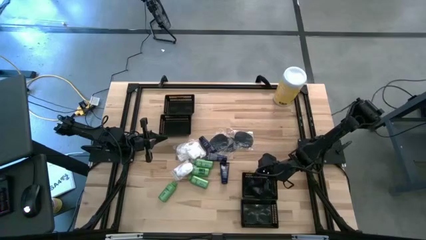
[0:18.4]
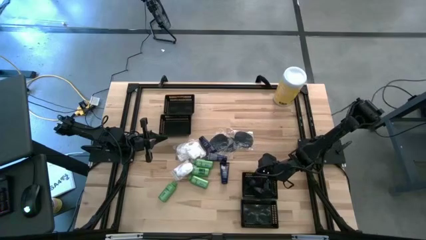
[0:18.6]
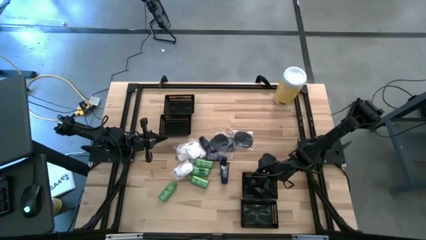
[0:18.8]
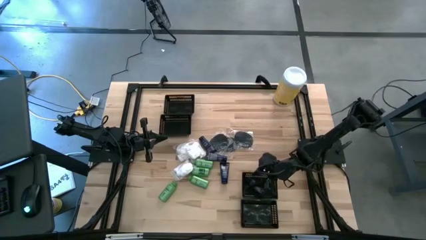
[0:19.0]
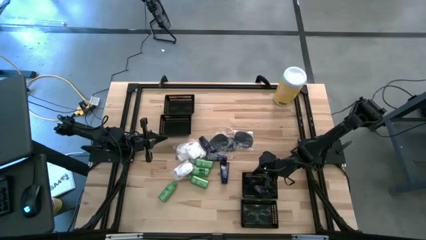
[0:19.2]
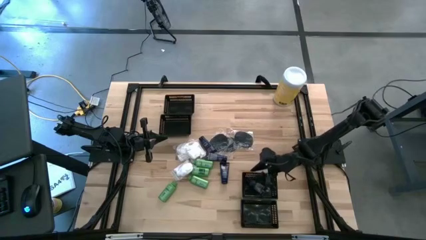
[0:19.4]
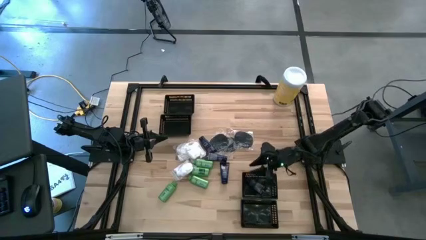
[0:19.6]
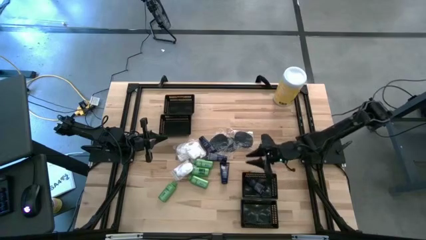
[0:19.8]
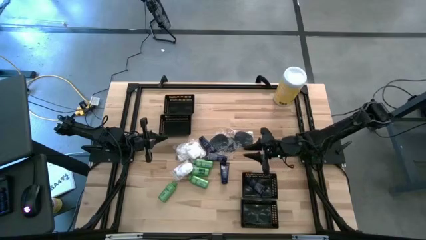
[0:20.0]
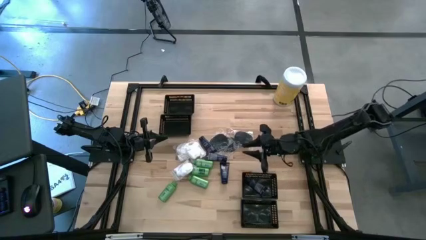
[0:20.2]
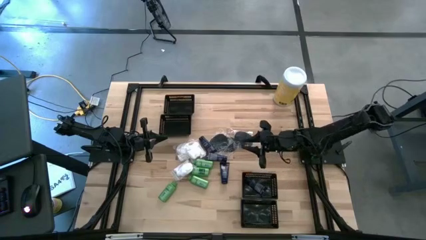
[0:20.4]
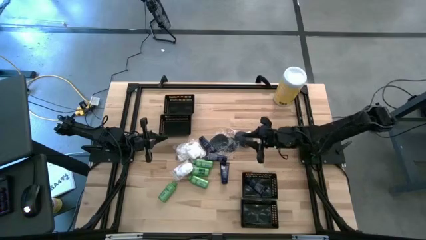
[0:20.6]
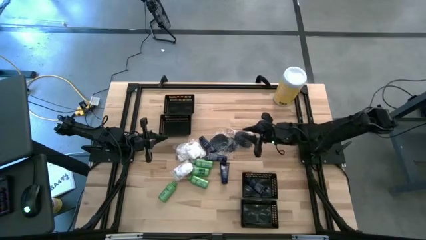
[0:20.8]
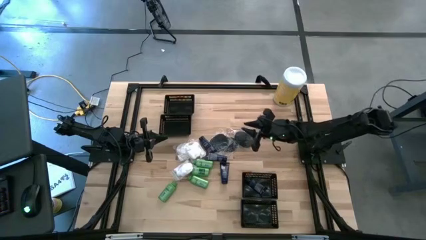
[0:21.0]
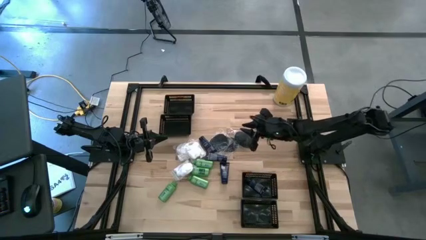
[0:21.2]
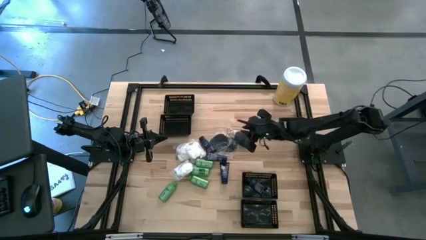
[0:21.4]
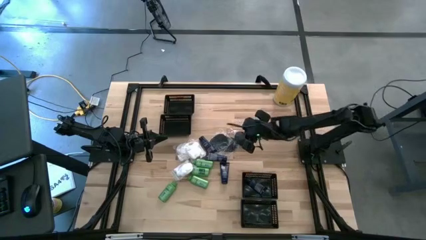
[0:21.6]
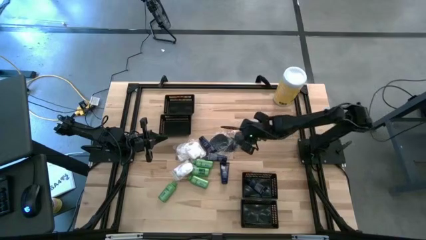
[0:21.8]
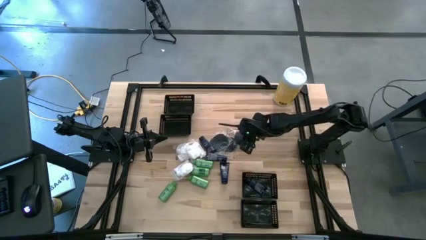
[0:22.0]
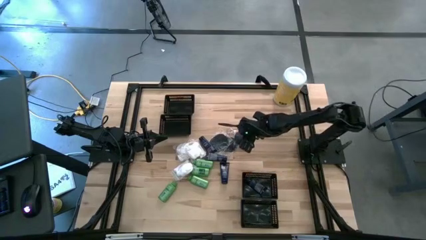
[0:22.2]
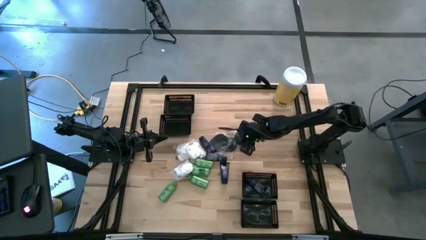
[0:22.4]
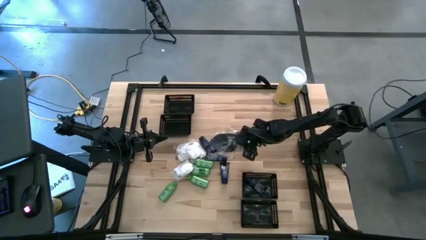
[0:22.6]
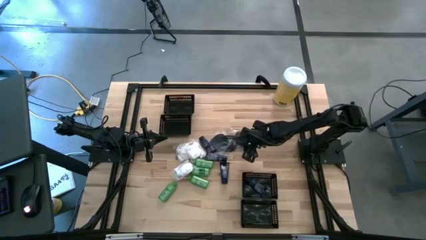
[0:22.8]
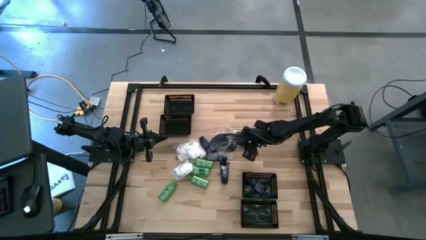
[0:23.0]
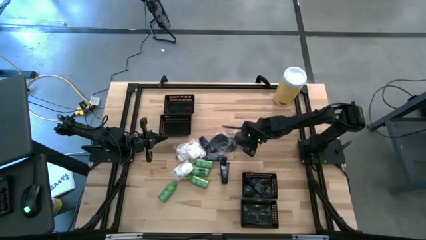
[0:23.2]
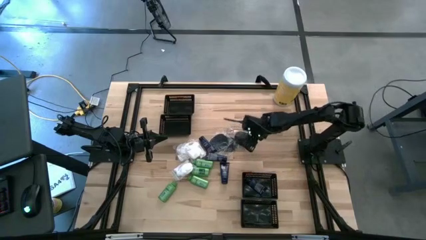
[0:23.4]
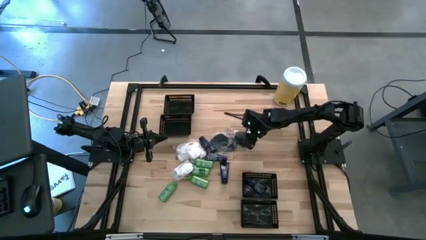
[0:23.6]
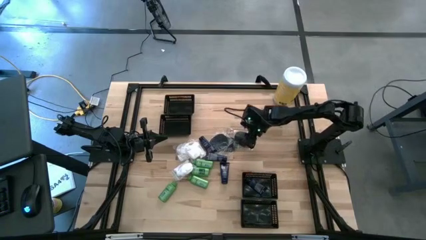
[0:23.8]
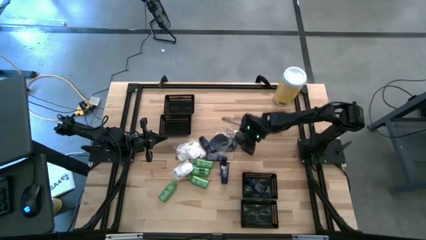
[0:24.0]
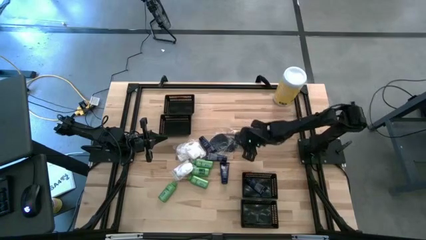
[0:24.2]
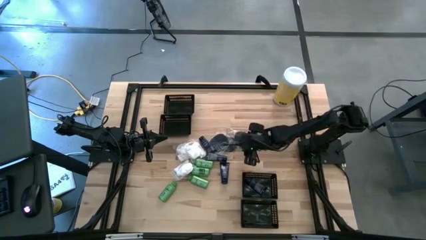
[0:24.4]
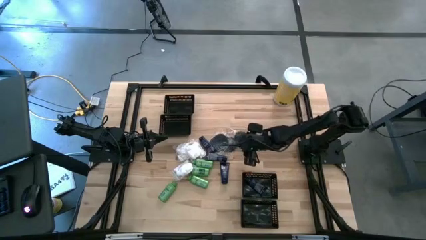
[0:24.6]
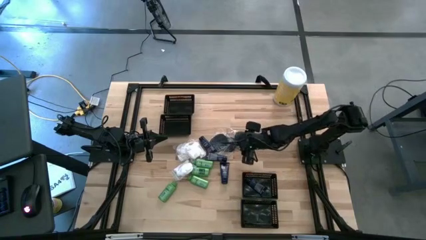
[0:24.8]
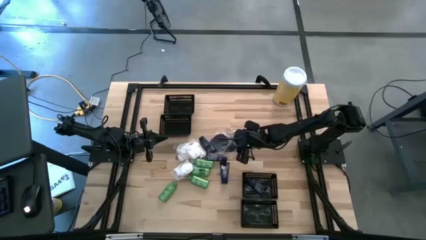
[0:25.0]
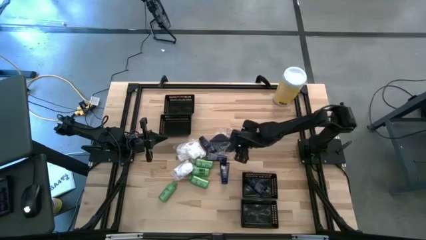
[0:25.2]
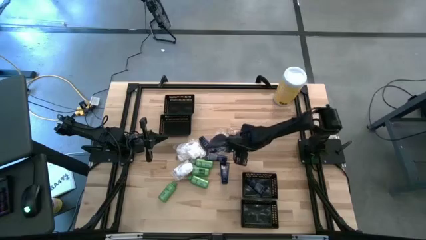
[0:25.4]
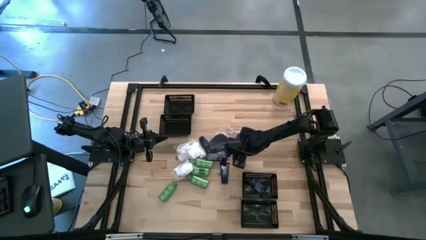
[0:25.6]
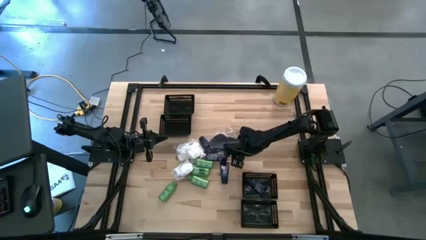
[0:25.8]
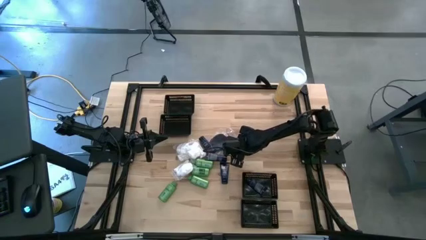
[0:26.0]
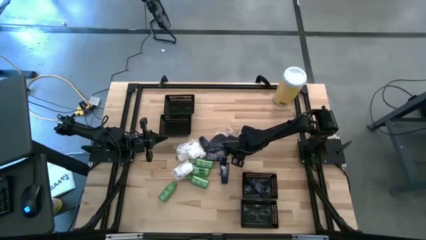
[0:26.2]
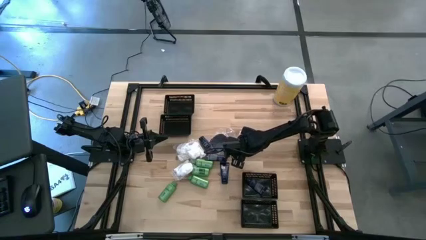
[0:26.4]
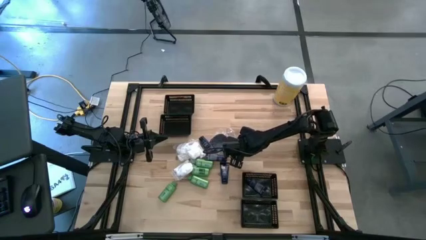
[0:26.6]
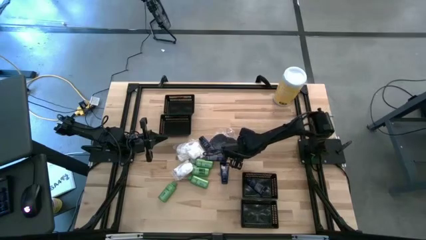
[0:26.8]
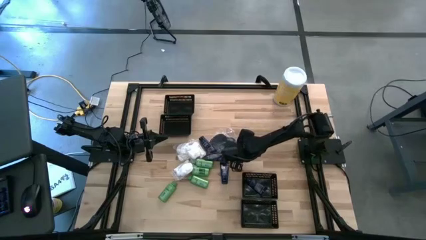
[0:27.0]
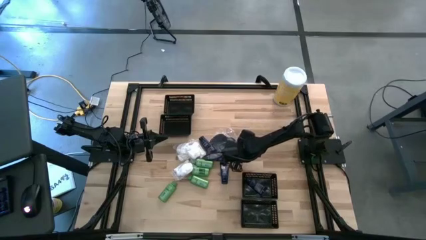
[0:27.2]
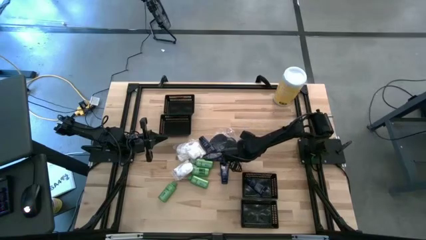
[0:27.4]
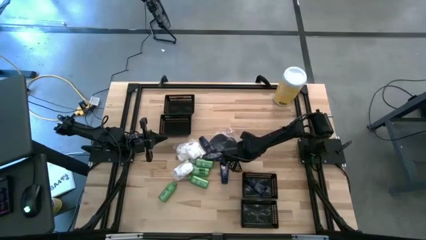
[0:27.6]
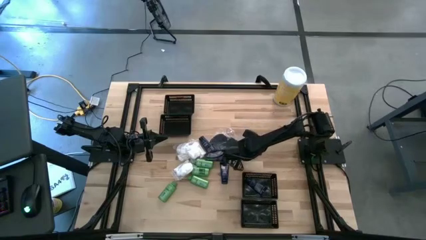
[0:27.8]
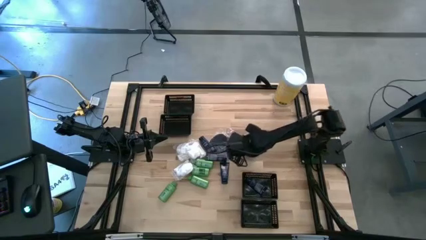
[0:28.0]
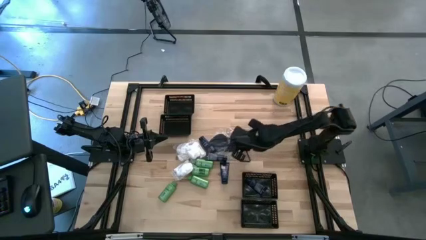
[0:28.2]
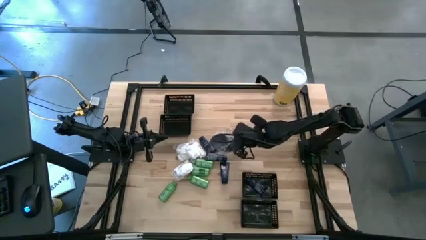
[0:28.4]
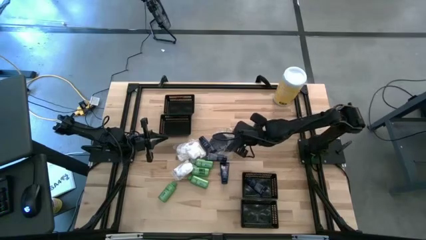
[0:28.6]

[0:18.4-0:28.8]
Task: Pick & Place Travel size toiletries
Put the black hairbrush into the top black basket
